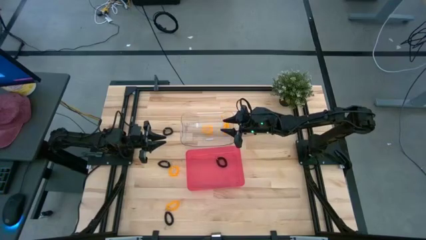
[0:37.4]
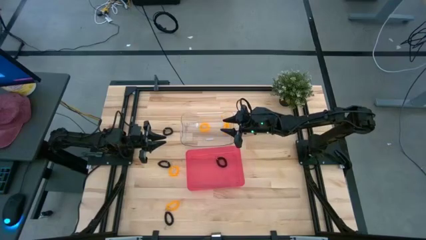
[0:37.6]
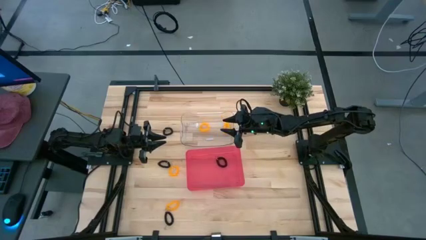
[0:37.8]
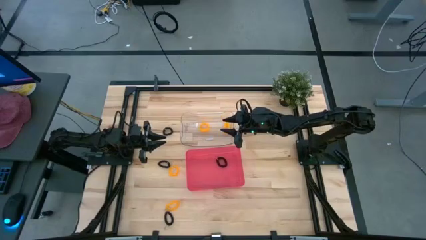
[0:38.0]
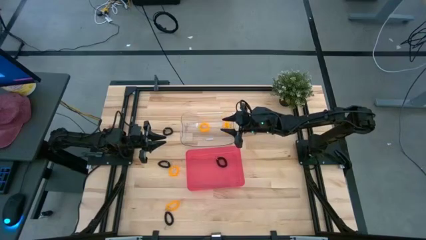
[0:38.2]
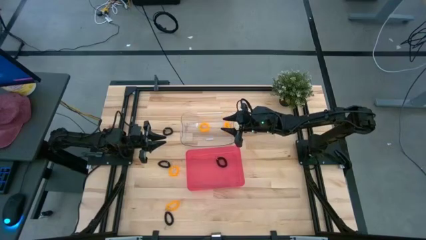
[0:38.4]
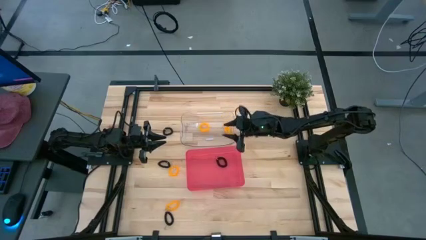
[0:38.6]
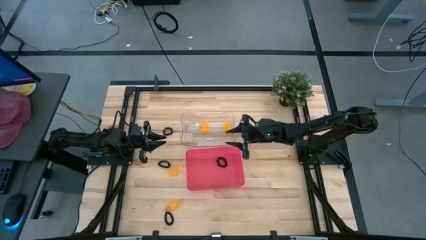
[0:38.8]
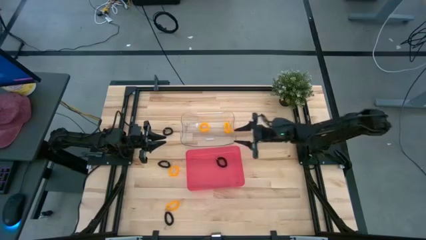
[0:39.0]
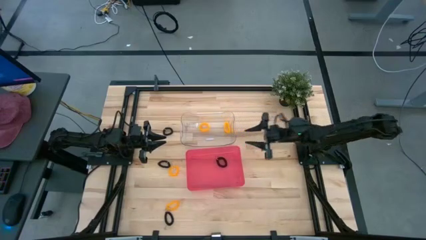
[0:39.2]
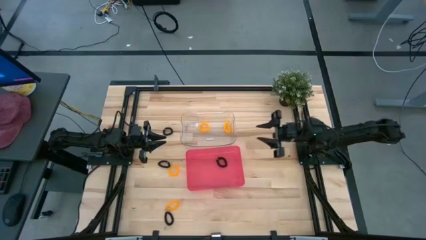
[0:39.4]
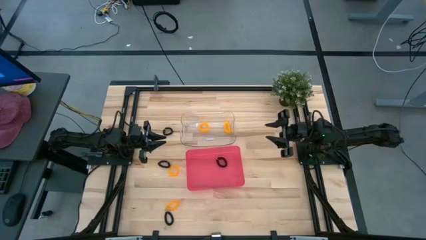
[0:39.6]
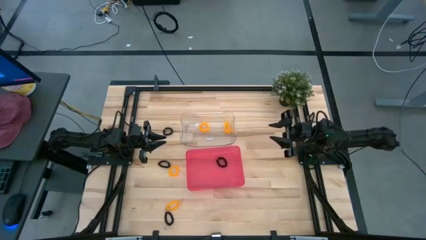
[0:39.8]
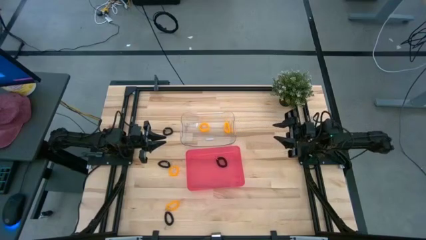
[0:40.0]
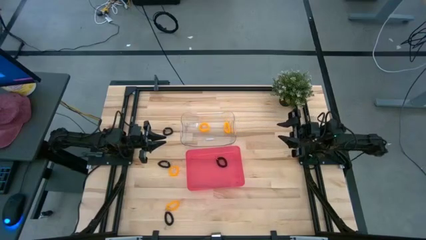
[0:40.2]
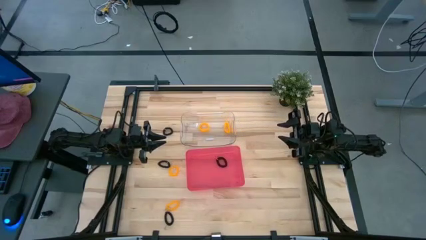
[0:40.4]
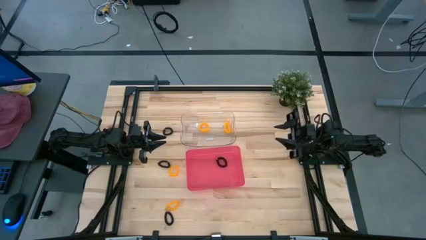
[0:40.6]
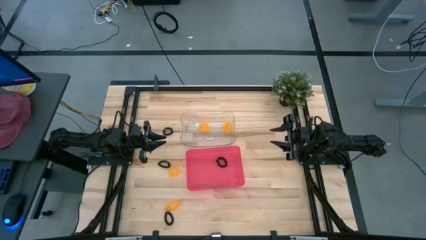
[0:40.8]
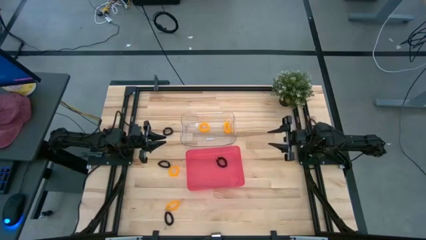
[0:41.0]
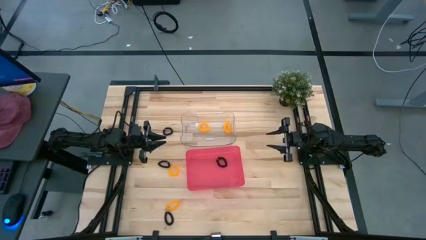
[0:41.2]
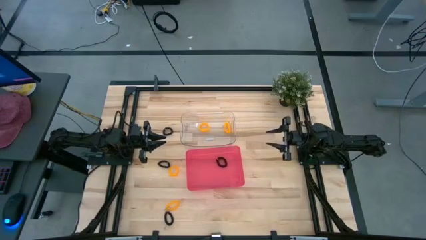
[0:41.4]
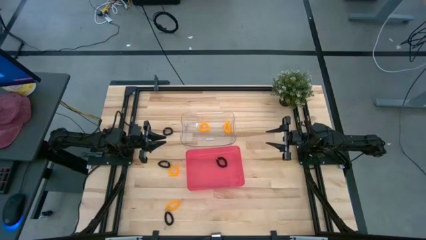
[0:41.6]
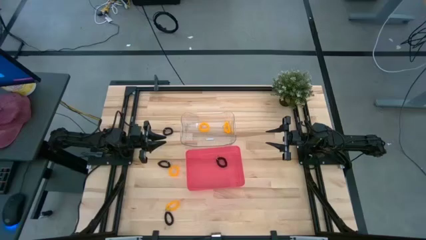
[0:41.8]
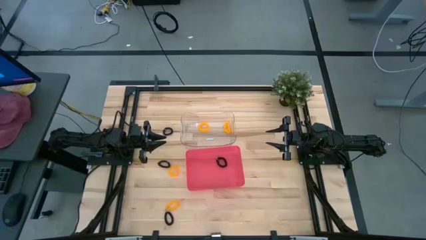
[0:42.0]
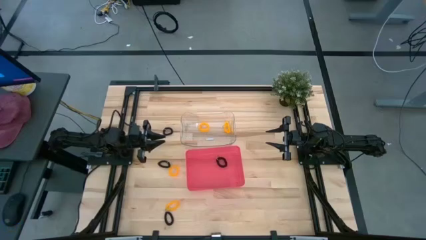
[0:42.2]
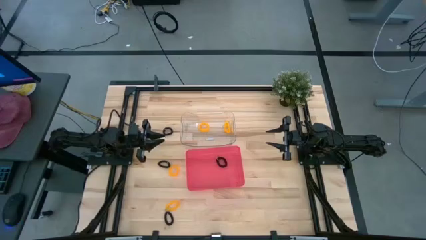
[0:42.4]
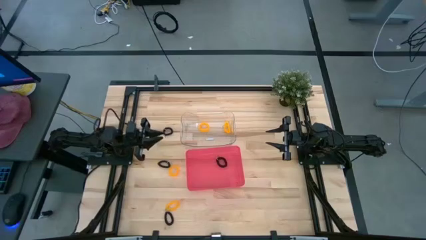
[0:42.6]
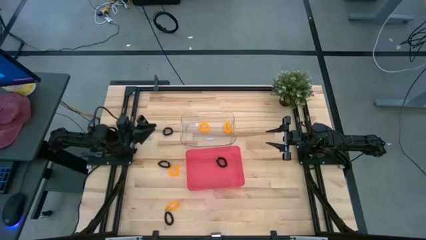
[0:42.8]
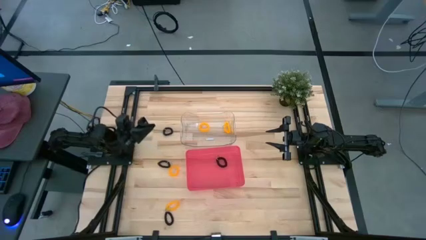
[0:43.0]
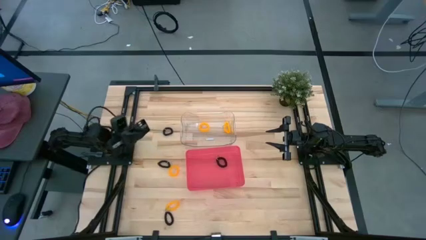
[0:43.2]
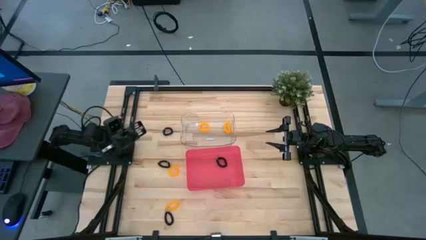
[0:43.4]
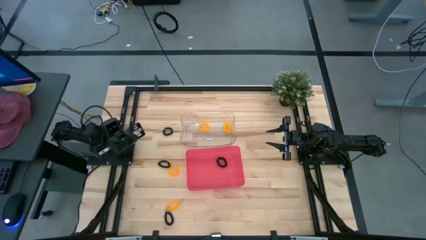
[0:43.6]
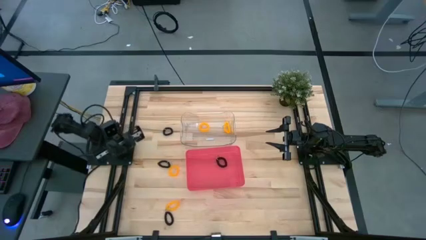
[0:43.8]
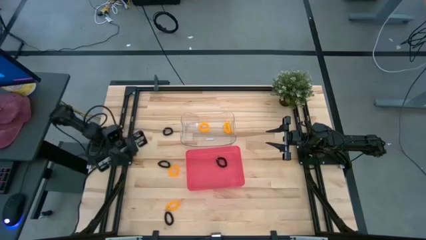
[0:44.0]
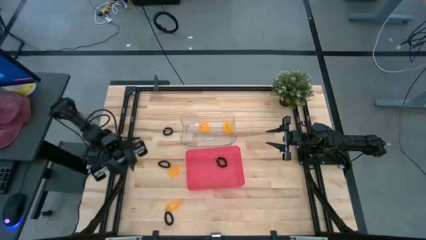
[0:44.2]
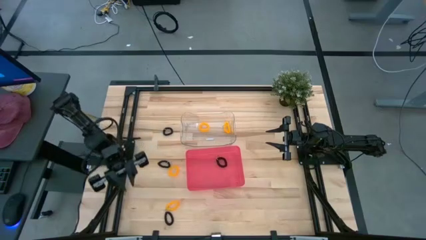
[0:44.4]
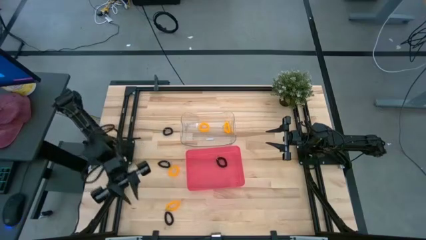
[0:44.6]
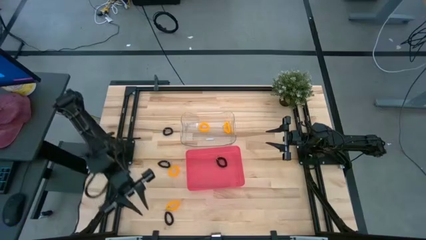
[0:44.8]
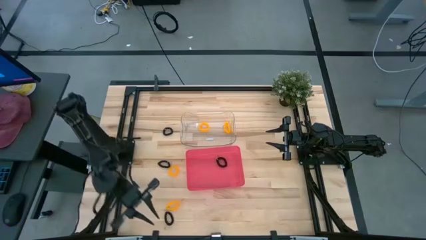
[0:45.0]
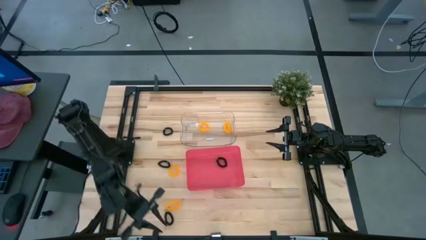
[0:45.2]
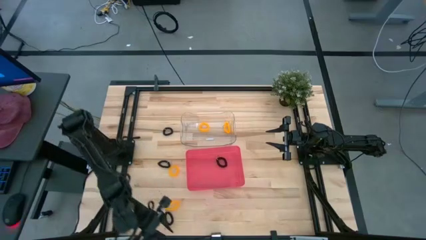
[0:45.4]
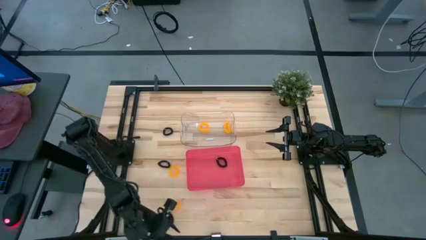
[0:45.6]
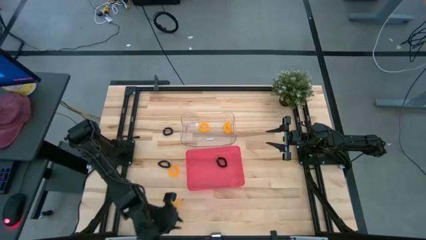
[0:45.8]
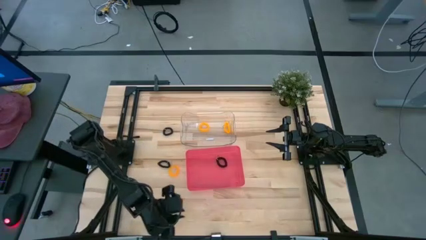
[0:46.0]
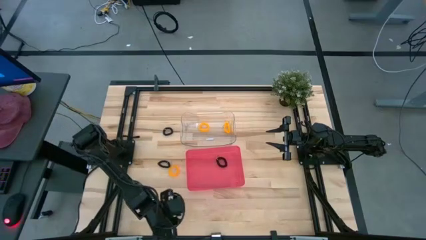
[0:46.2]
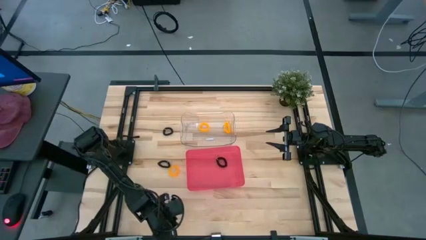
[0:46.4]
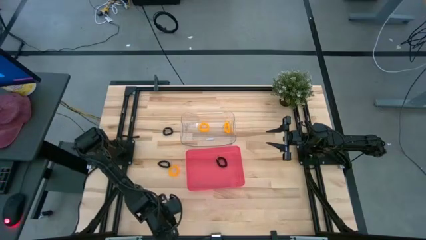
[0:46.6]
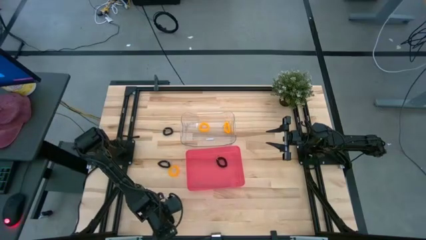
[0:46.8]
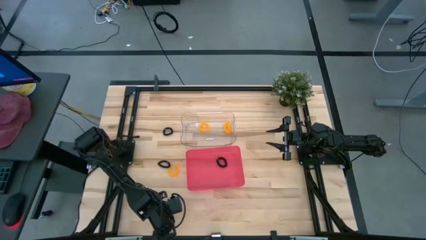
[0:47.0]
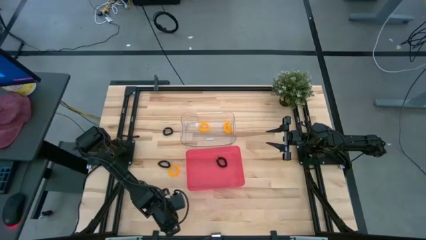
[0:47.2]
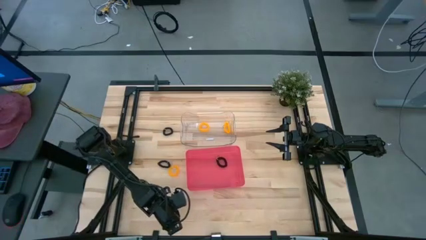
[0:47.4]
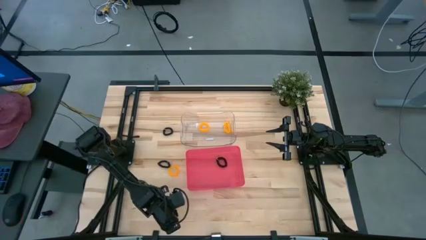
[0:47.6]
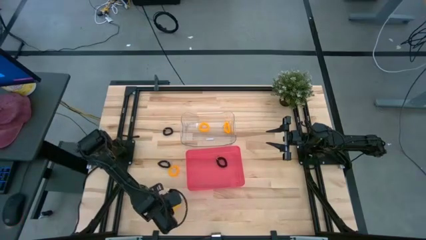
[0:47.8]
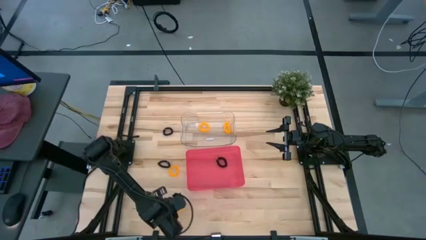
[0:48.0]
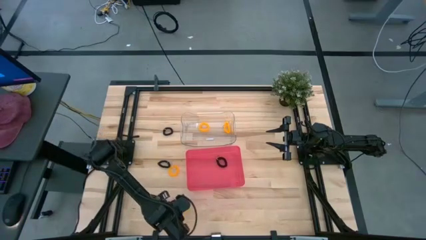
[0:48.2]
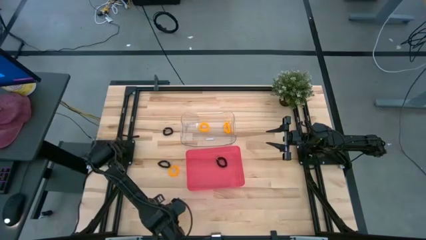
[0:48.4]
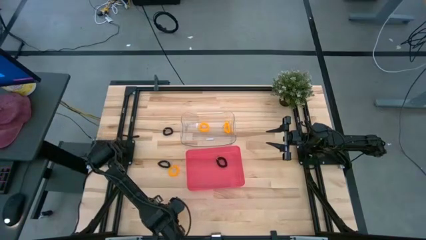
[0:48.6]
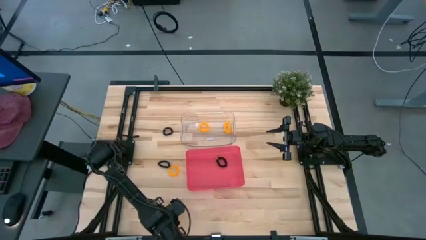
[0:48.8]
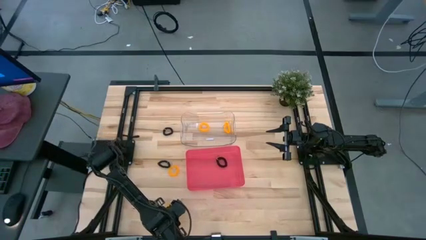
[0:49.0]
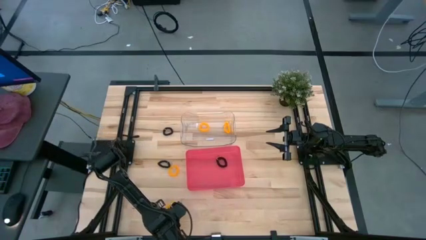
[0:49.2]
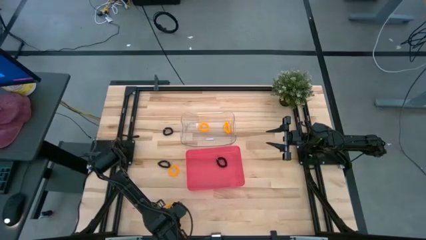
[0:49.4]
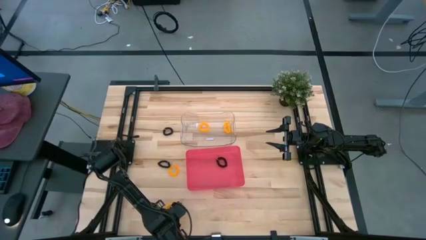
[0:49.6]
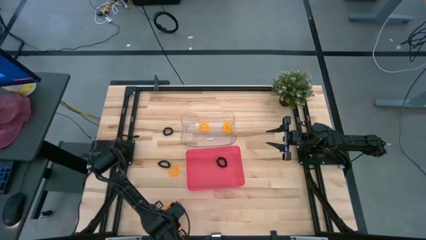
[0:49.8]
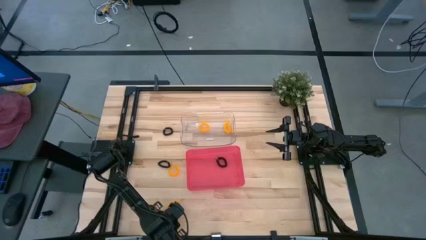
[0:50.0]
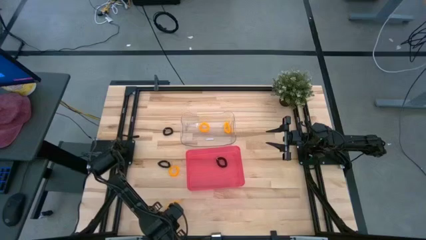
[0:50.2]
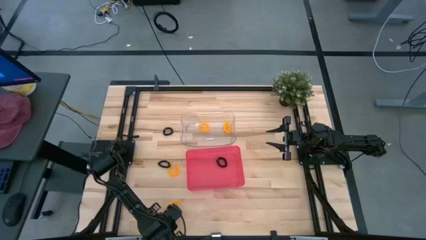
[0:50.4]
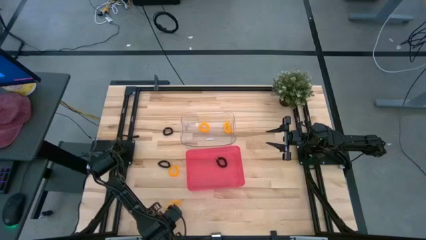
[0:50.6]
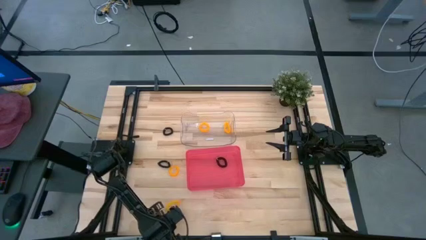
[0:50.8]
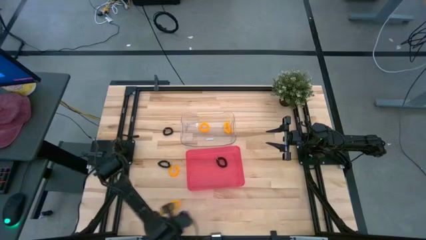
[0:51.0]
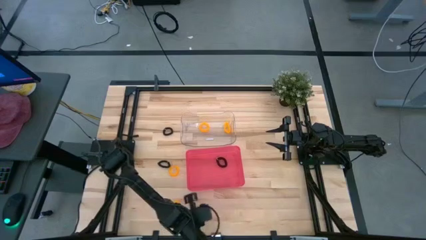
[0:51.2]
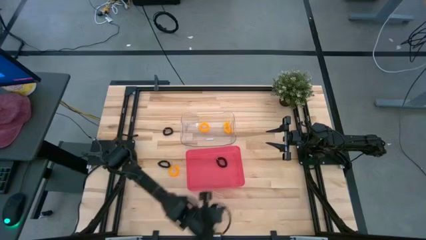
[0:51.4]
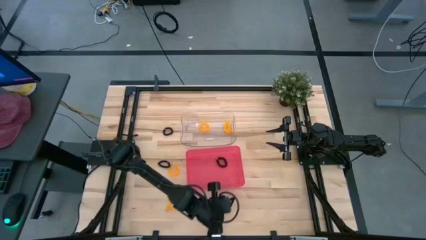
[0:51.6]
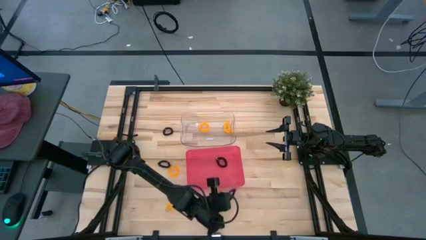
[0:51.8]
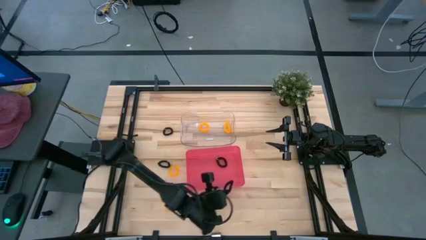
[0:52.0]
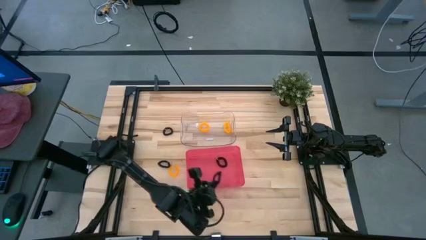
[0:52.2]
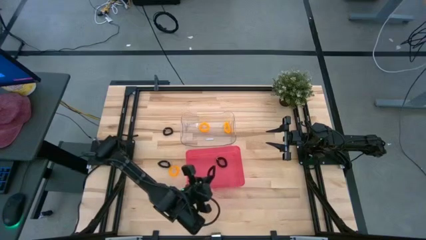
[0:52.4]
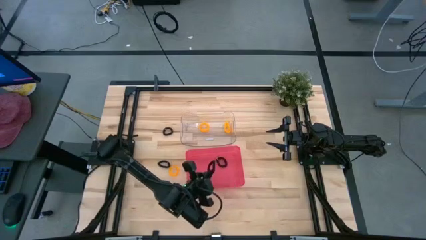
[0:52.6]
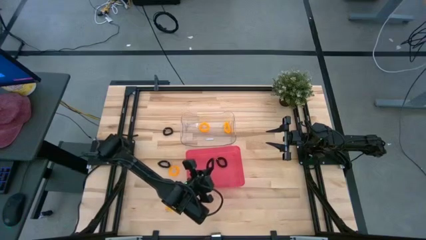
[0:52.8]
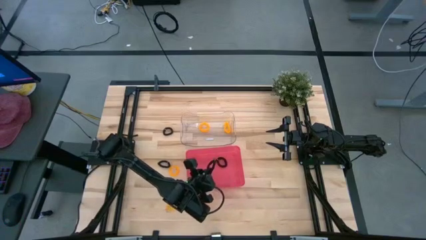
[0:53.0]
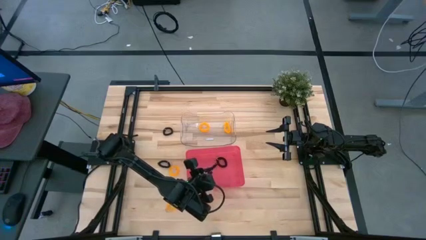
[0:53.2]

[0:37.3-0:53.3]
Task: Sort spring keychains
Put the black spring keychain into the red bin
